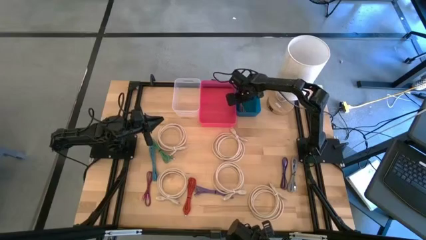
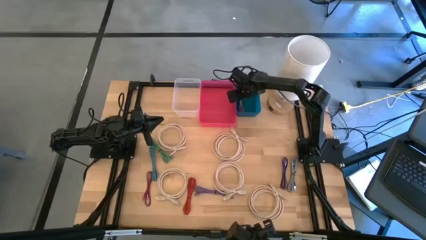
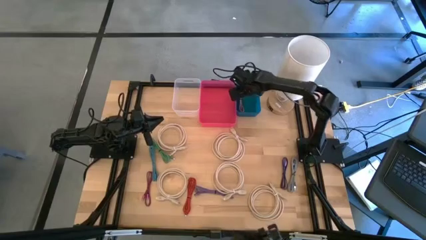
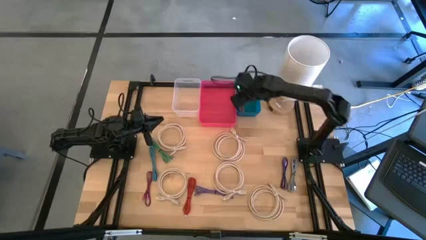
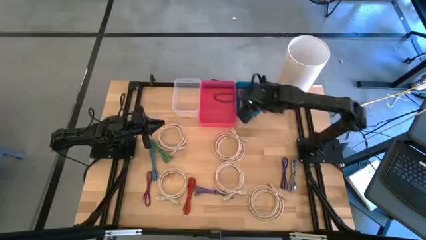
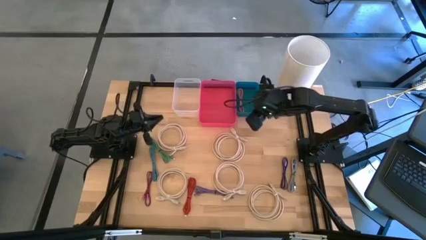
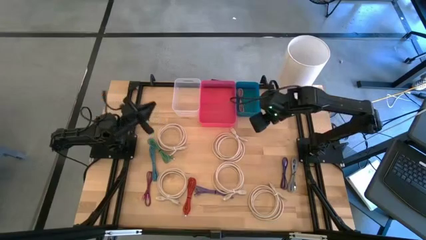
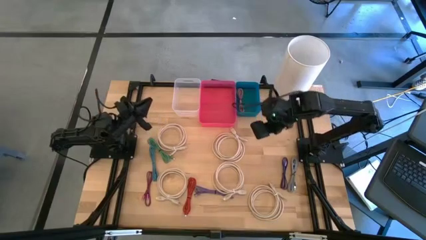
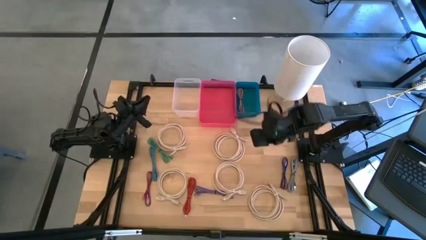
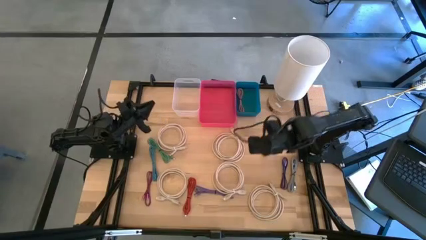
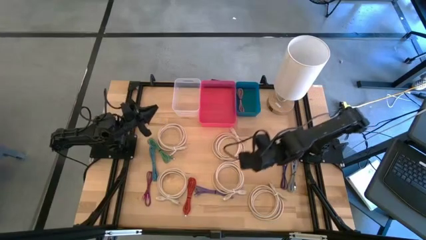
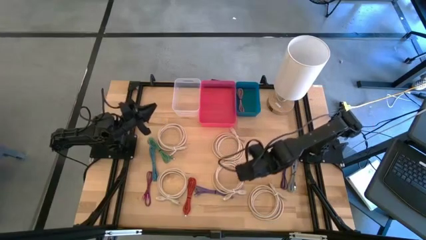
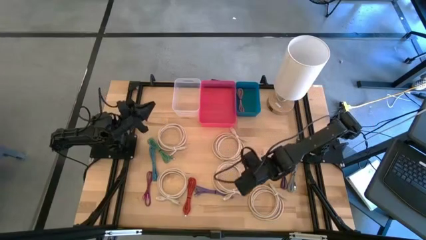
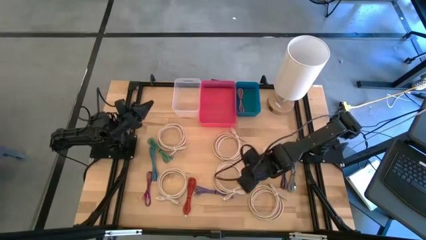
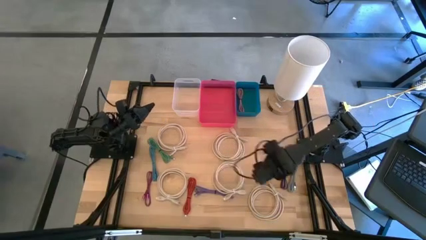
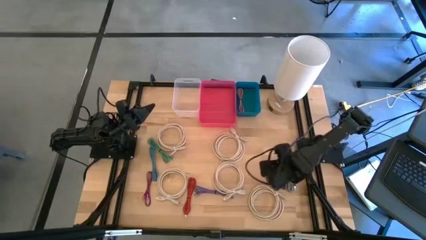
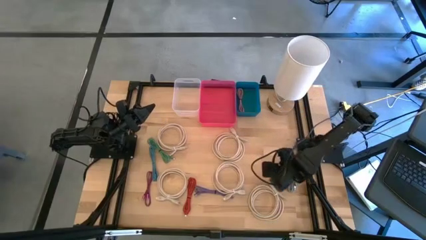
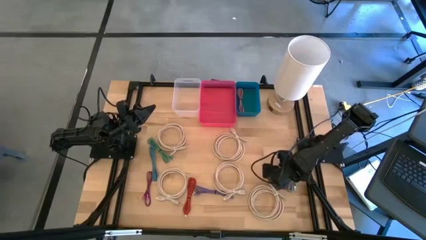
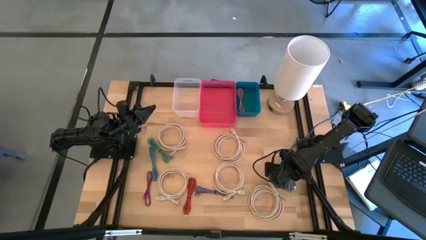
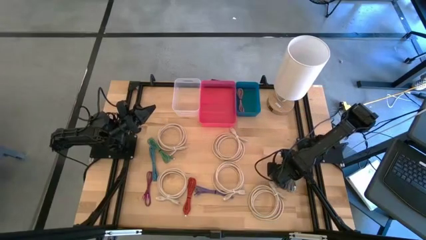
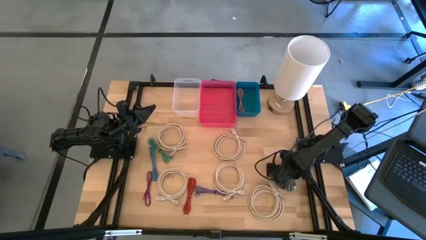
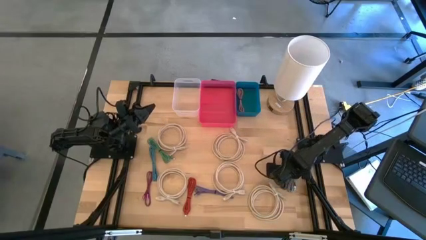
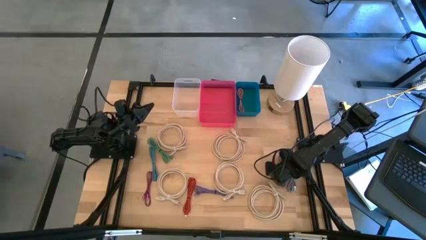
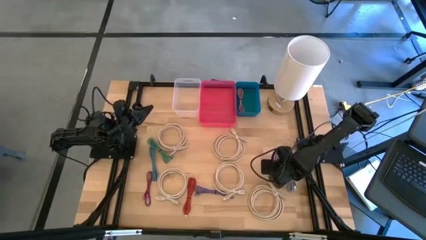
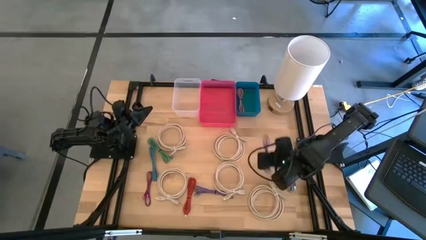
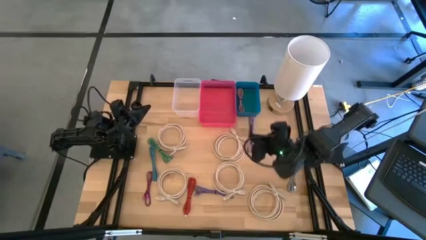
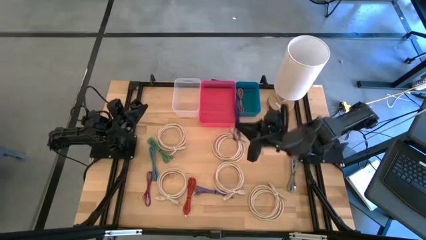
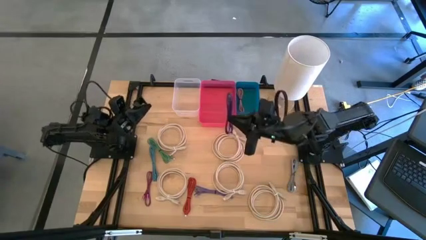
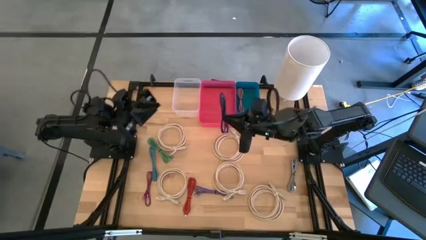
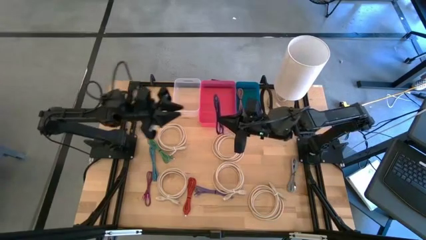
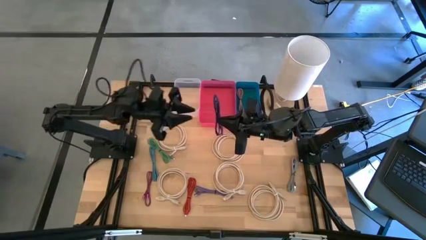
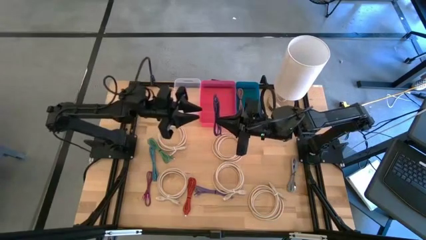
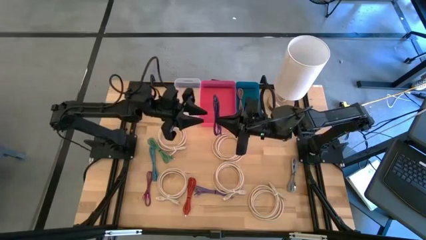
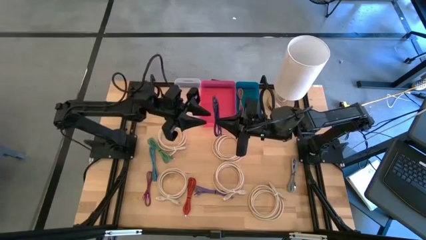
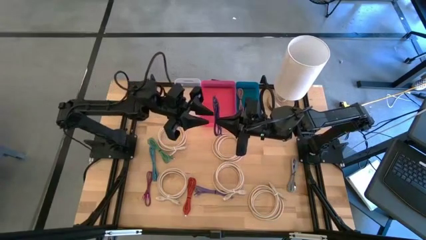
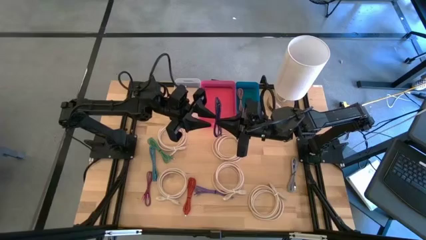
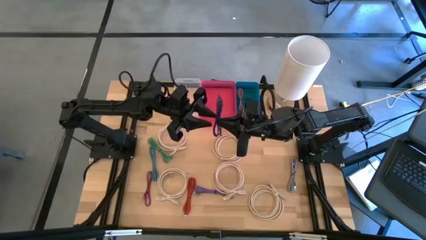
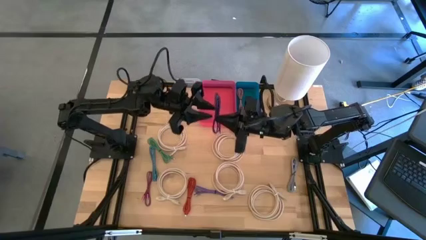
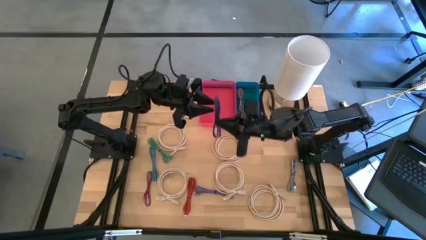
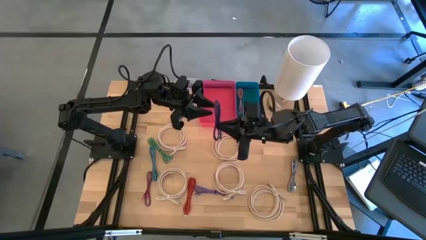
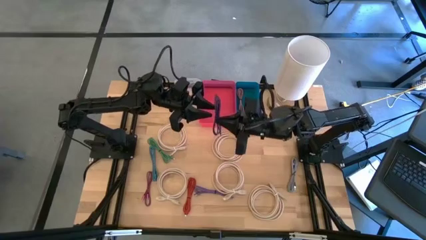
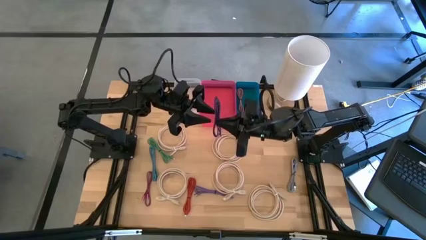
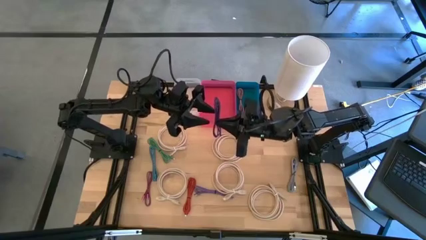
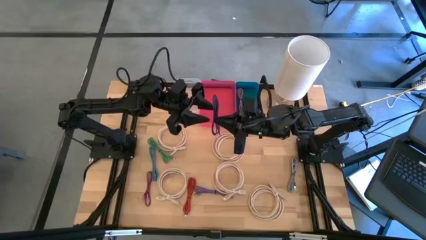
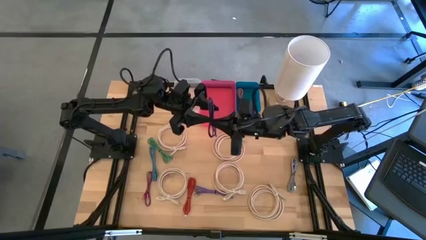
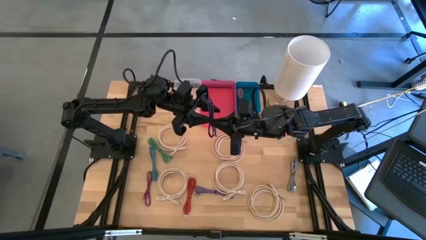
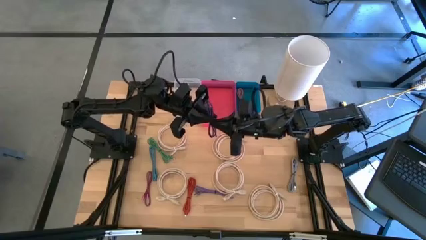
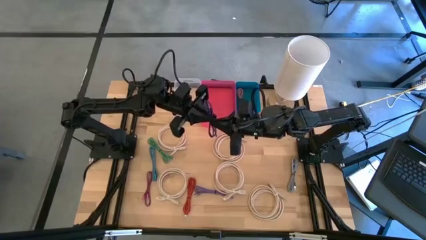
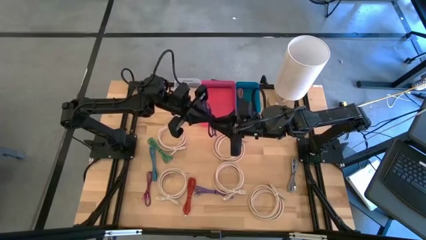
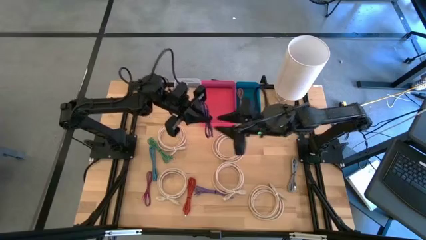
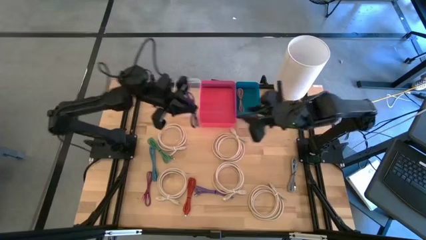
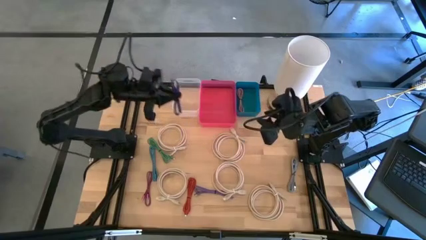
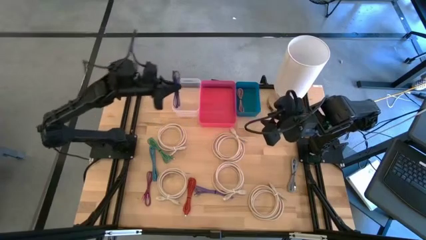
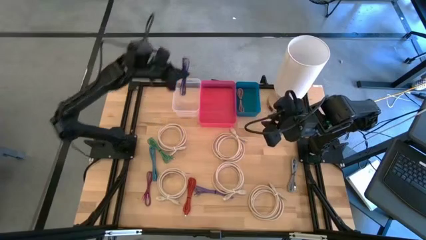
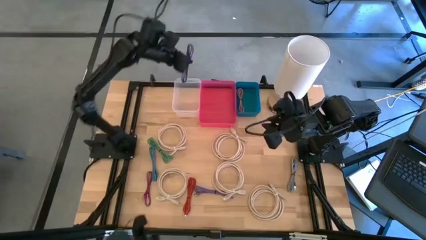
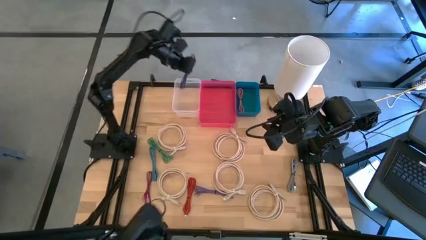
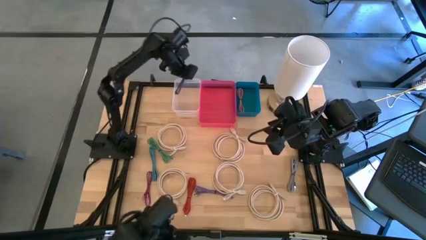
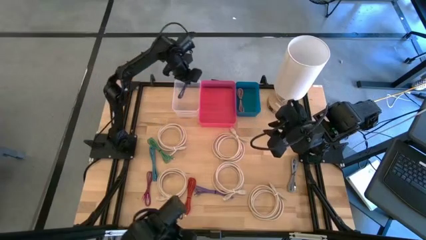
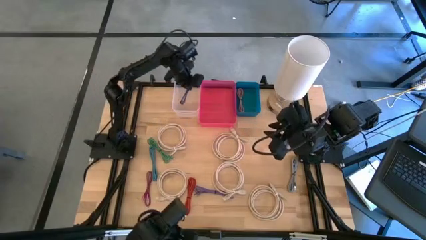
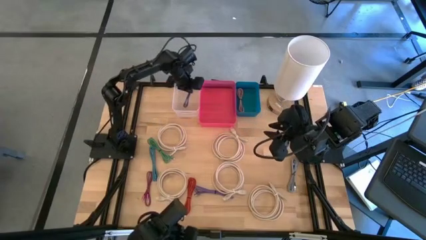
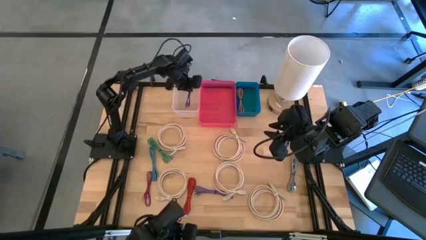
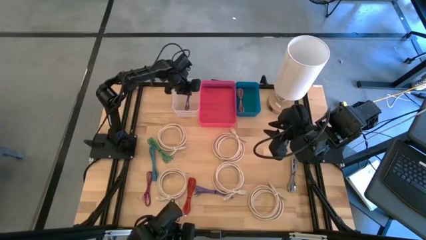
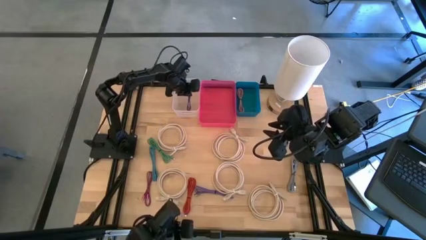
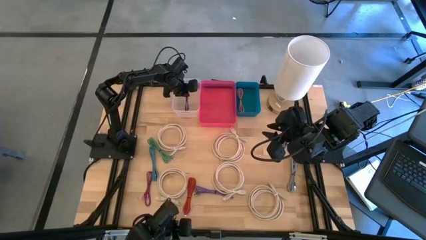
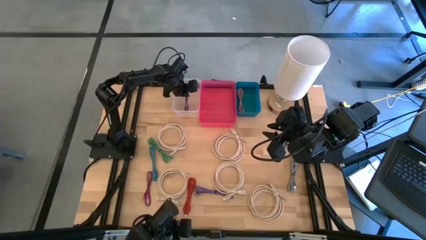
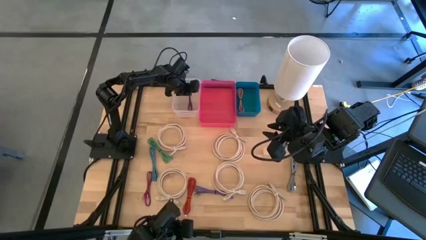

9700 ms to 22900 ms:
Task: Pick & Place USB Port
Put the purple and black USB cable into the transparent bin

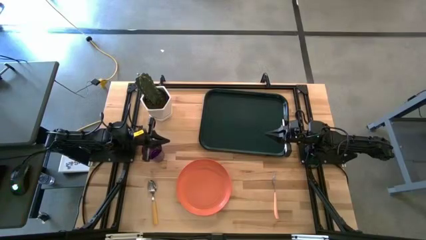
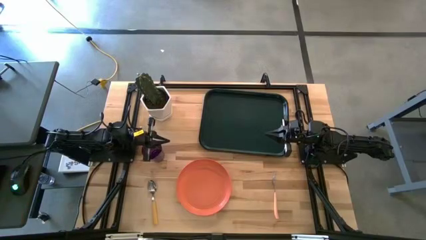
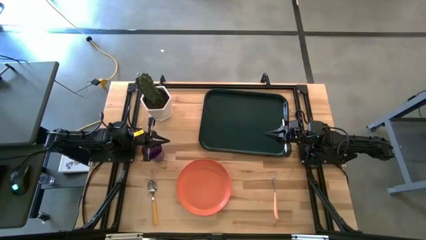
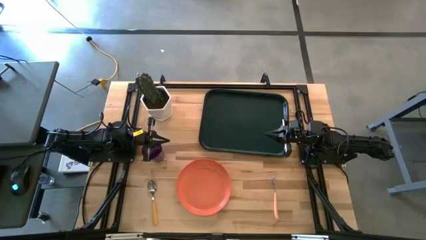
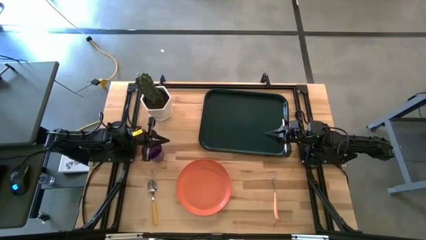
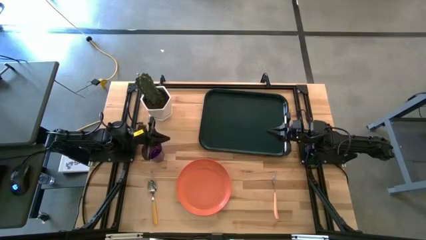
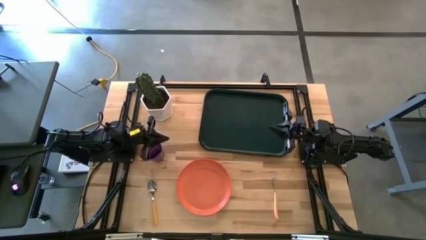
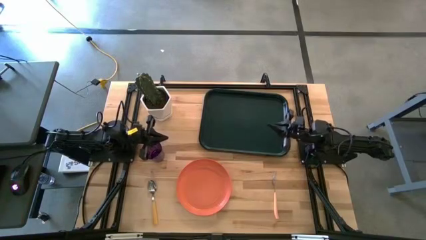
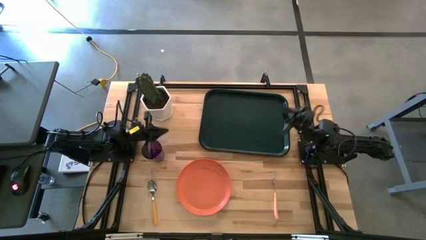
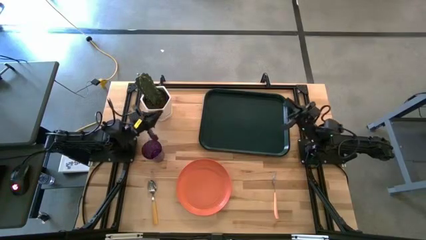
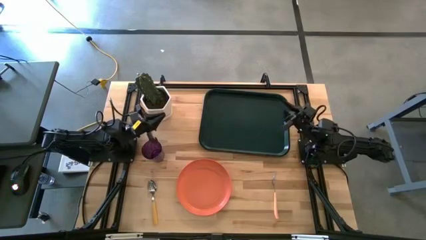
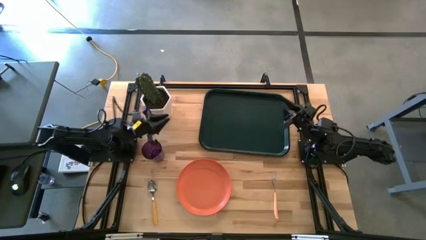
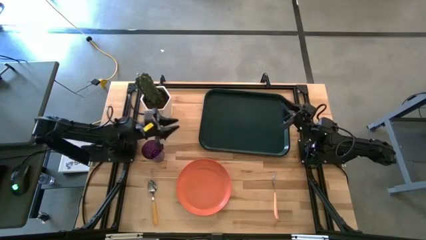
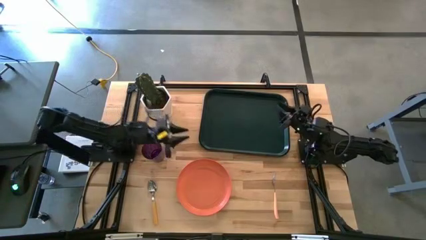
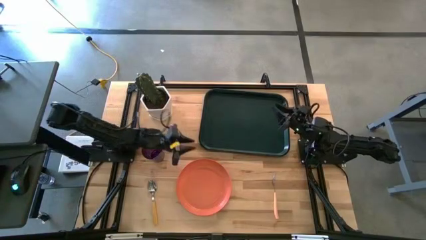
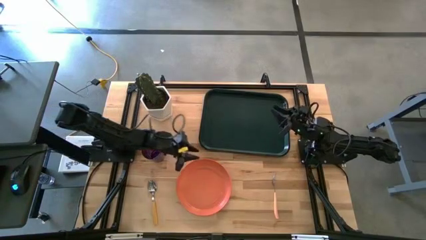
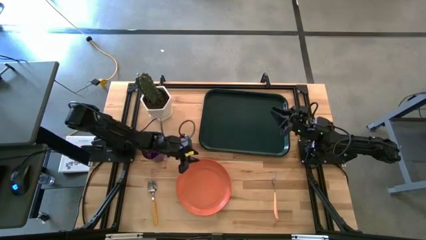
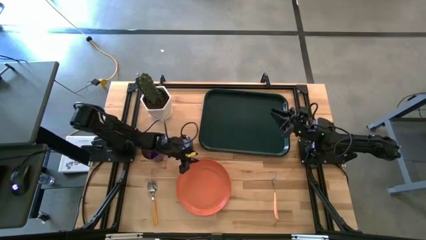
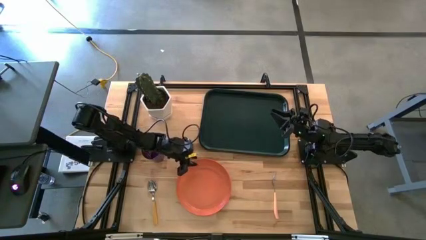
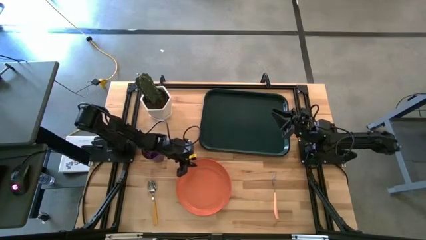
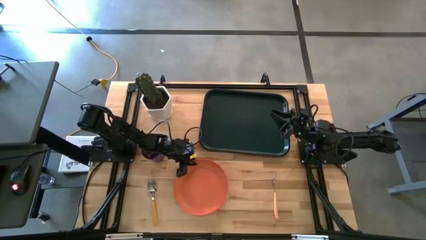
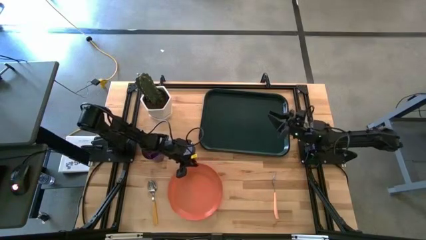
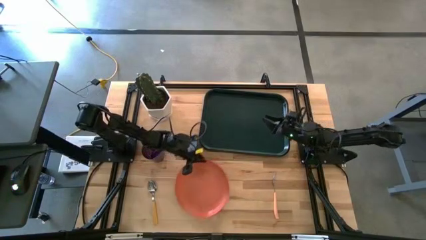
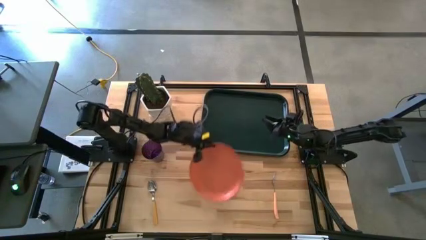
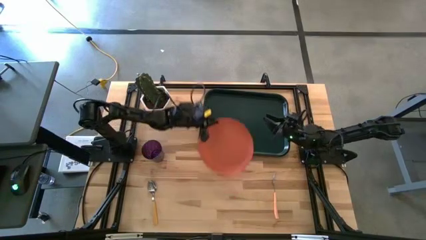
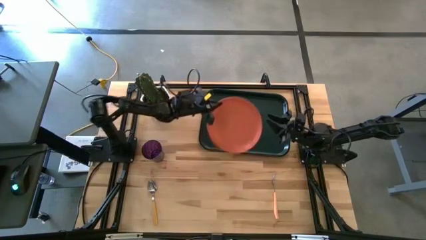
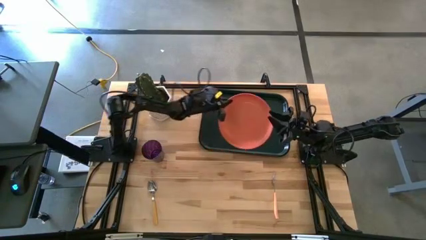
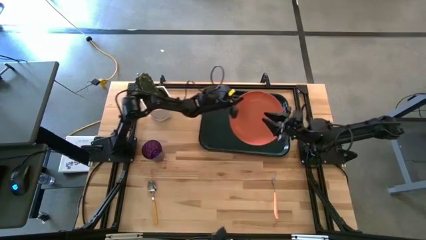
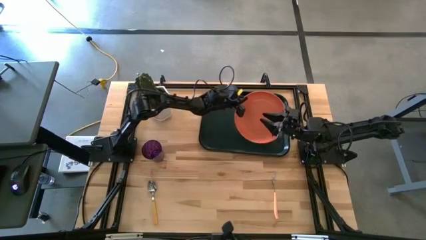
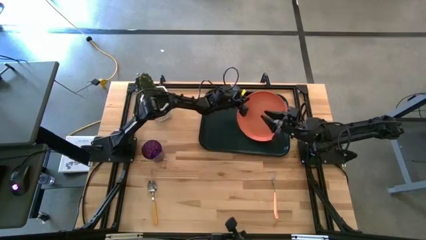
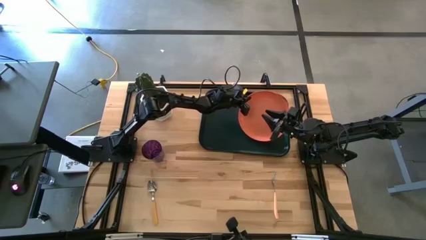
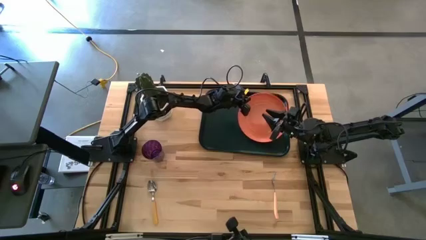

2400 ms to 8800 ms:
Task: Pick and place plate/cup/fork/spoon on tray
Put the orange plate on the top left of the black tray
